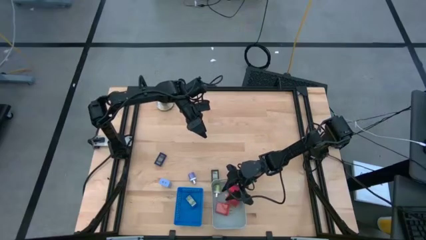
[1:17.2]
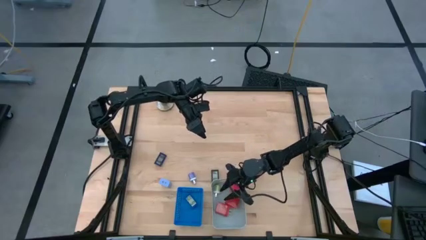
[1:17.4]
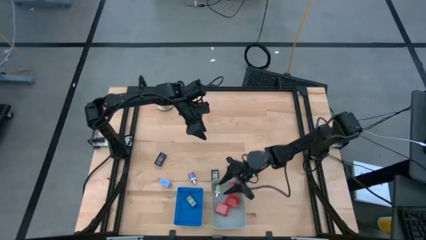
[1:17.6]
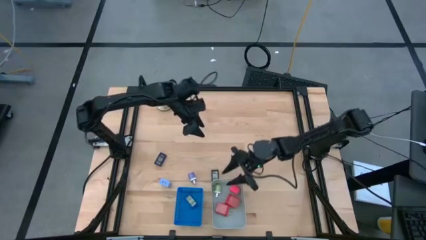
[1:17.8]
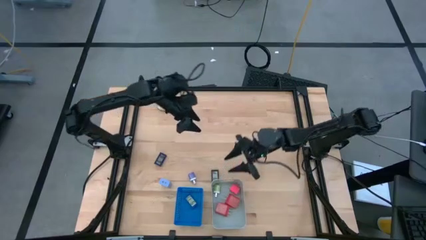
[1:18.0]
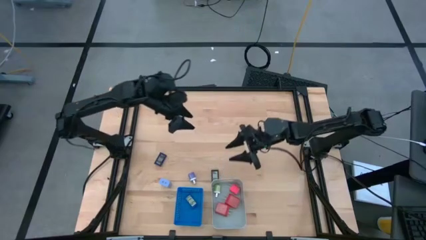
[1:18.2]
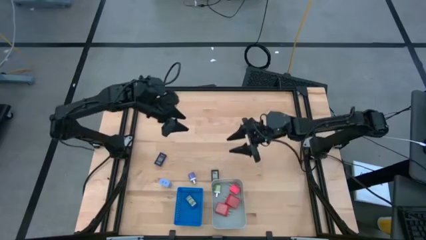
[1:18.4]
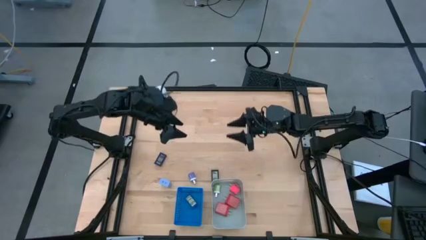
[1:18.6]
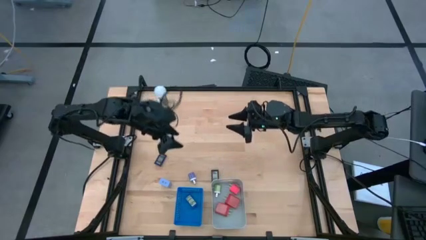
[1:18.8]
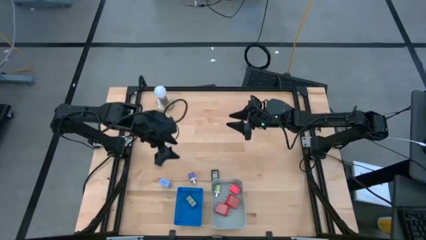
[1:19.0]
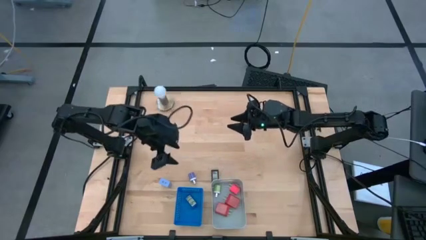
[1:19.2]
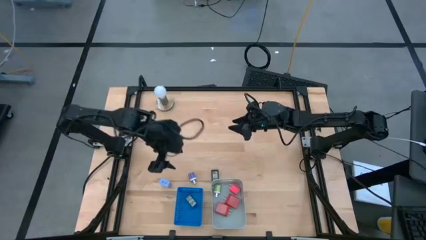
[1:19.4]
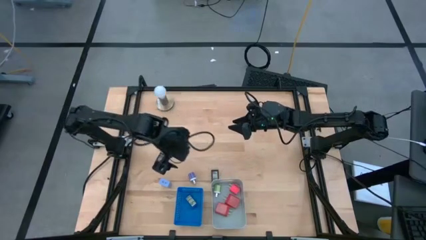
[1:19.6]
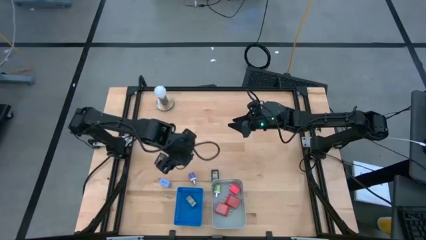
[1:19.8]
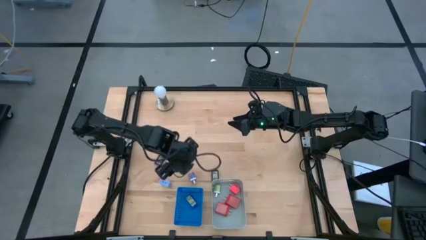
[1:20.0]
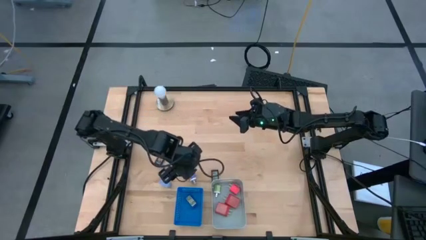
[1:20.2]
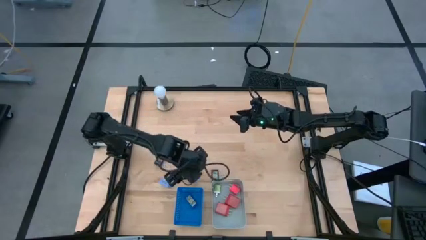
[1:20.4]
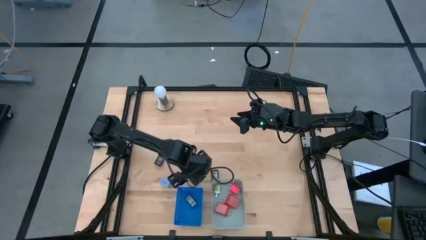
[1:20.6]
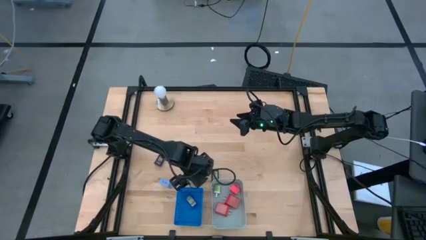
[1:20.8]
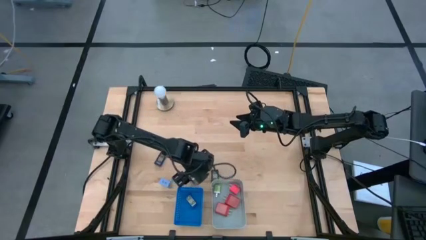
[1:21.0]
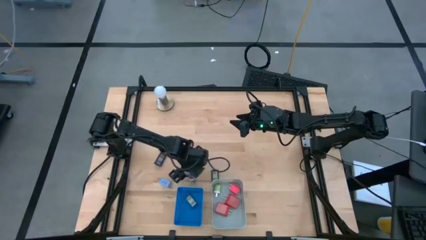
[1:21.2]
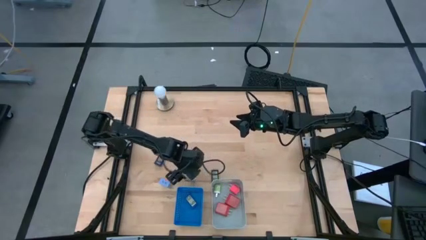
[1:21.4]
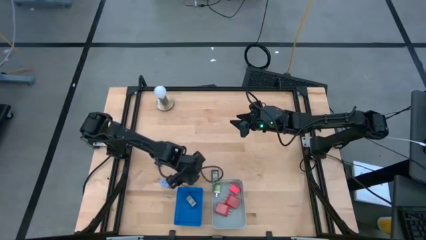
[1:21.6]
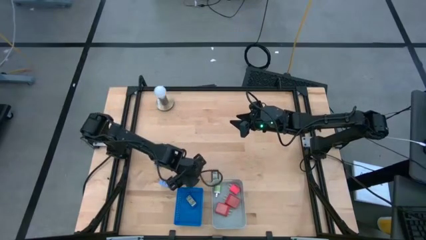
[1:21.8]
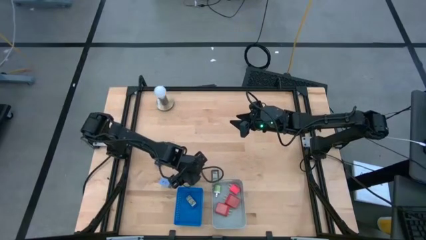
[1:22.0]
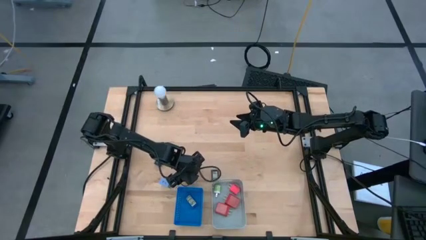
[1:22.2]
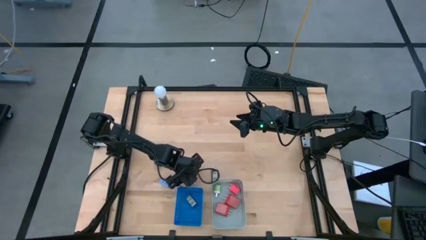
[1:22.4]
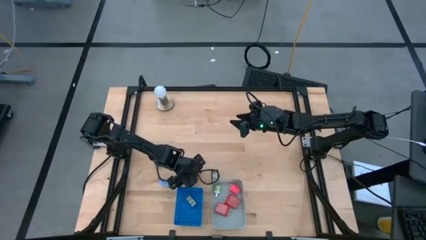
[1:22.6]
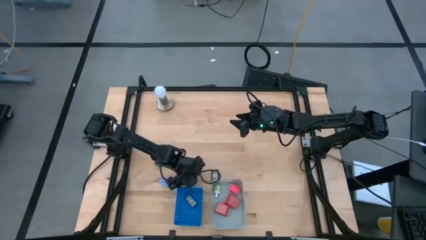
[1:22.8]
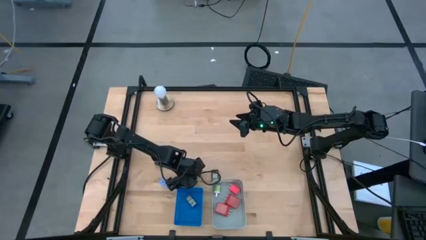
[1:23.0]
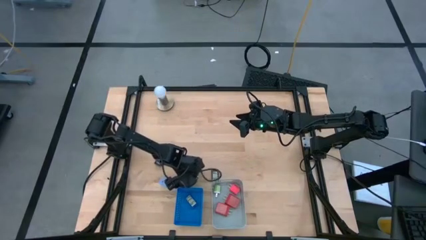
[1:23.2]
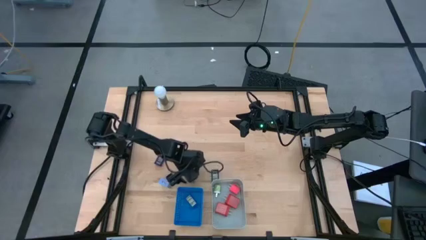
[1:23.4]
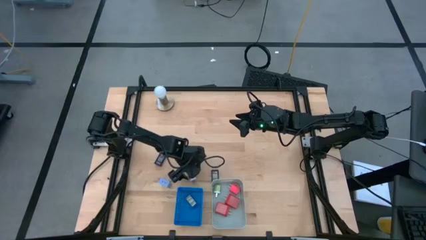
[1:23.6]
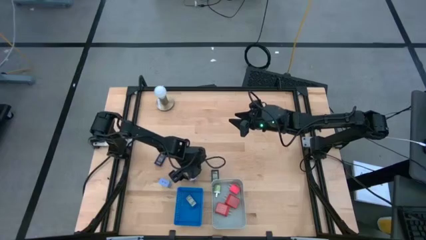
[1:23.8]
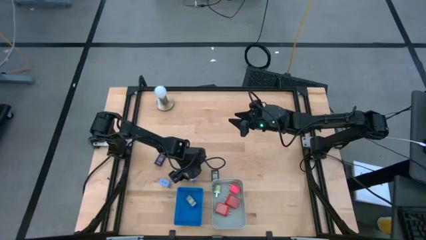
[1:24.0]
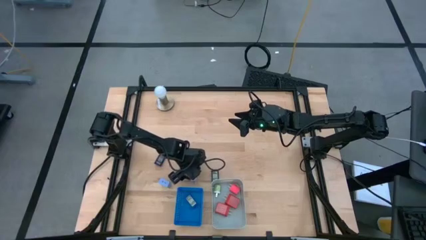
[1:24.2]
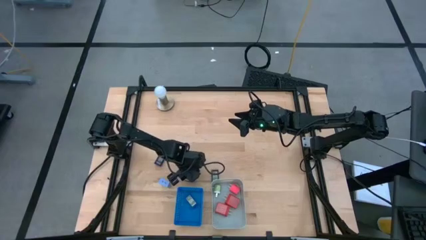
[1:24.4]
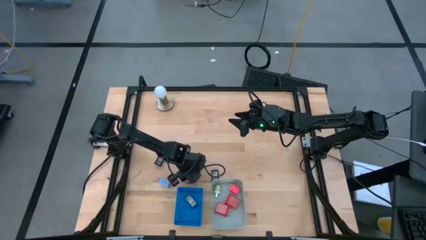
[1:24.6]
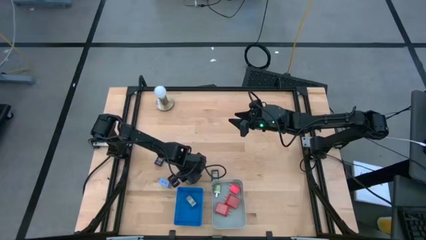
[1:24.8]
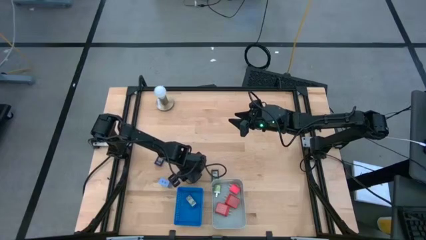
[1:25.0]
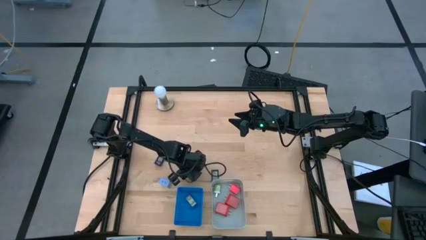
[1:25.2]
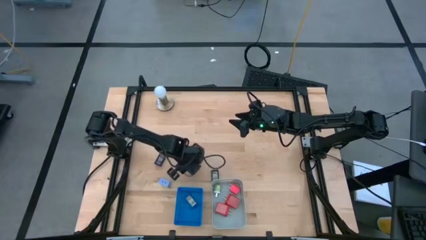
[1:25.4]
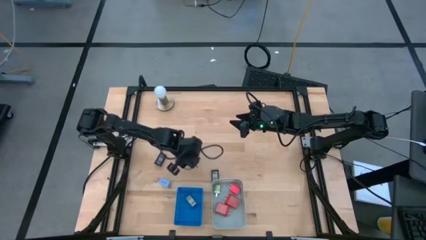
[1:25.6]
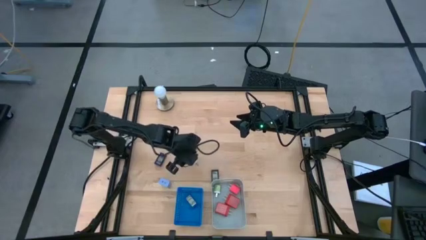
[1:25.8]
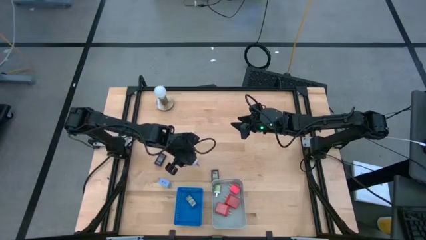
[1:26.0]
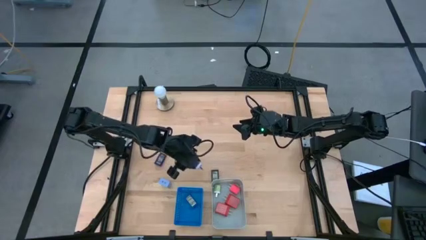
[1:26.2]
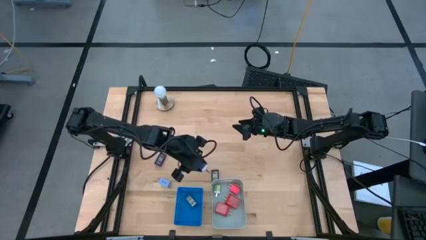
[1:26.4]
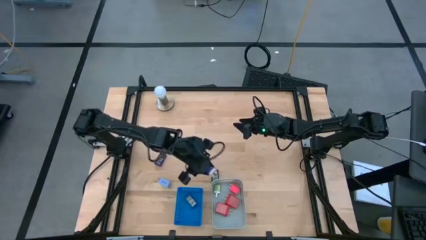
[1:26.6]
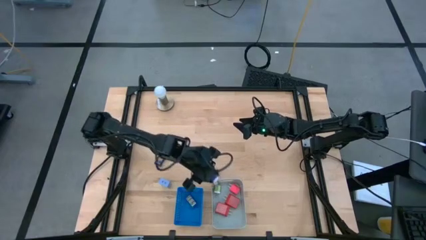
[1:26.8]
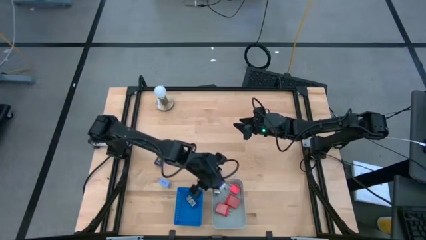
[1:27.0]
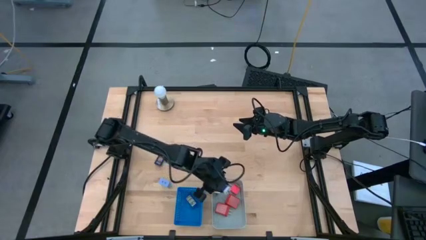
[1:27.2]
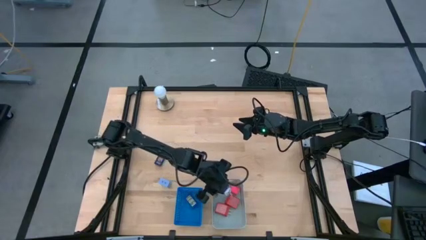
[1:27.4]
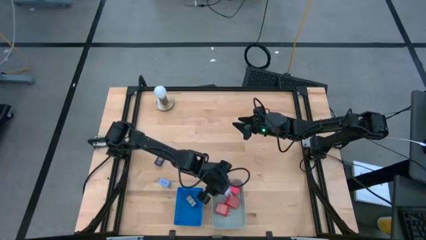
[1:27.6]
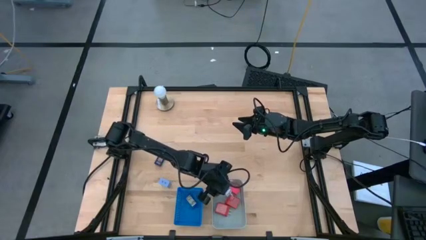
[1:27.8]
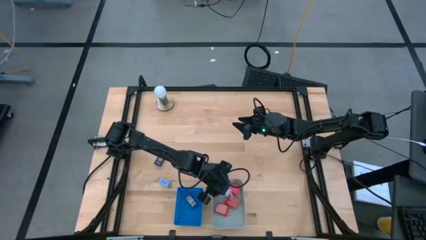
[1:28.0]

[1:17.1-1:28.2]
Task: Pick & Place Office items
Put the purple charger adapter into the gray bin

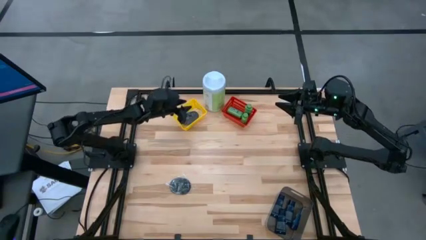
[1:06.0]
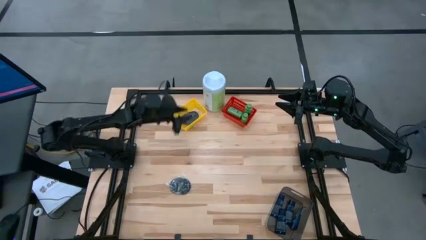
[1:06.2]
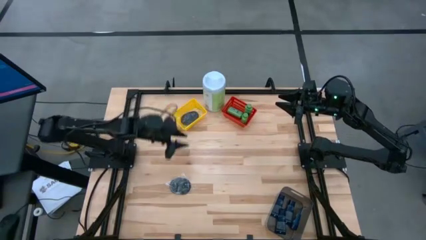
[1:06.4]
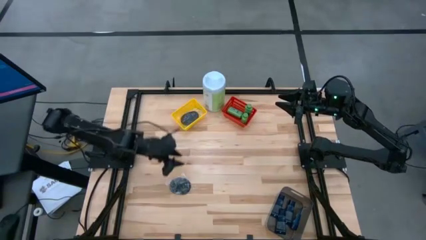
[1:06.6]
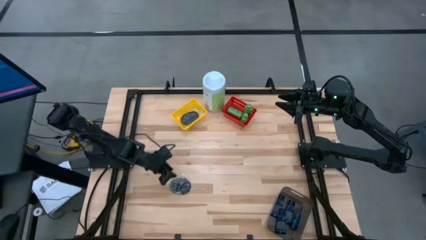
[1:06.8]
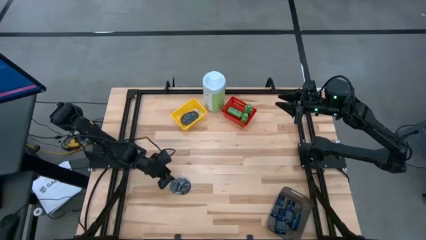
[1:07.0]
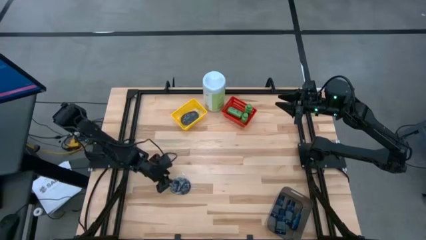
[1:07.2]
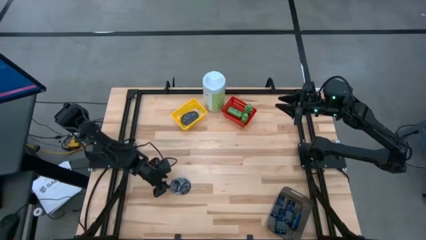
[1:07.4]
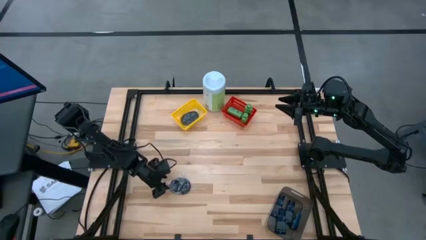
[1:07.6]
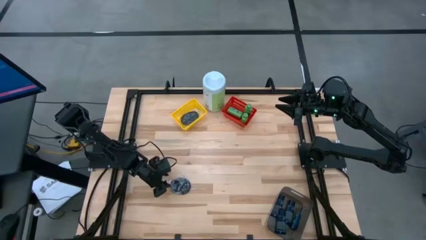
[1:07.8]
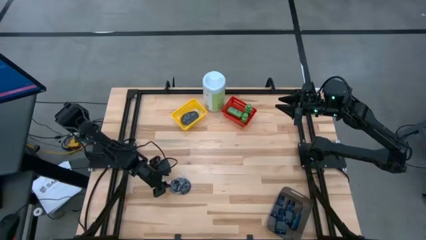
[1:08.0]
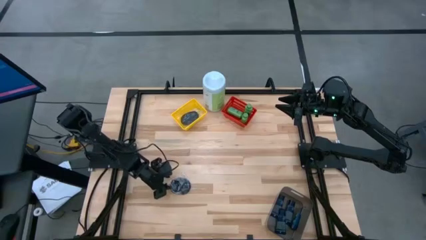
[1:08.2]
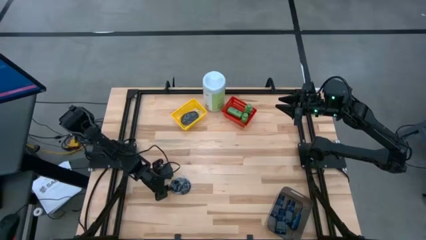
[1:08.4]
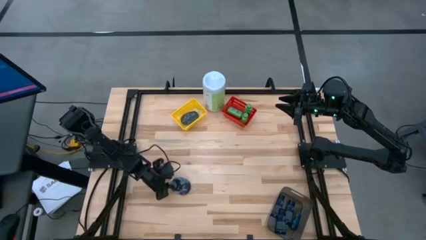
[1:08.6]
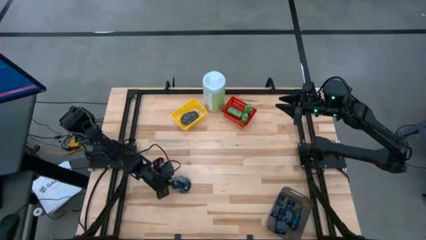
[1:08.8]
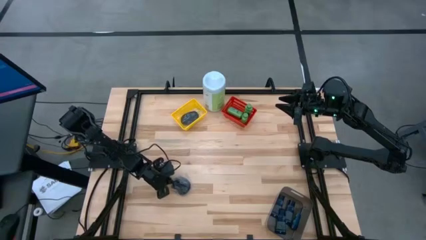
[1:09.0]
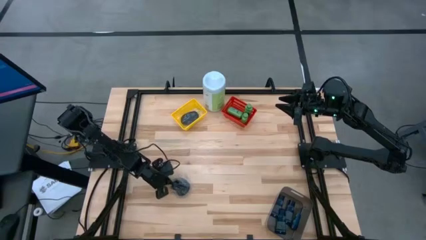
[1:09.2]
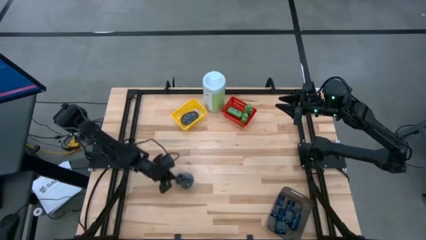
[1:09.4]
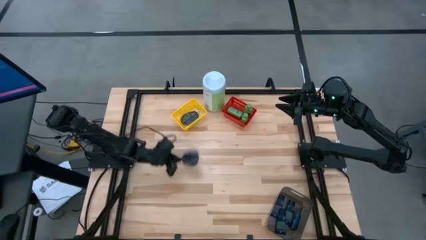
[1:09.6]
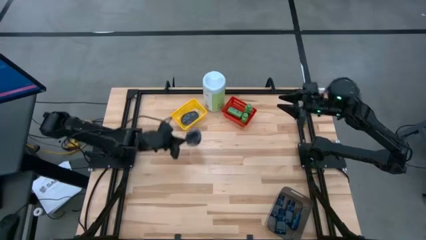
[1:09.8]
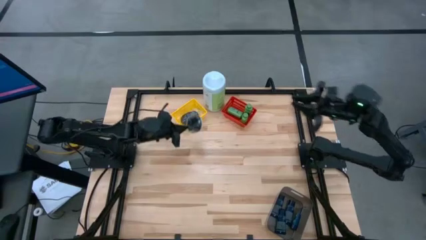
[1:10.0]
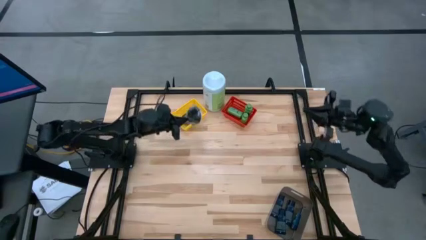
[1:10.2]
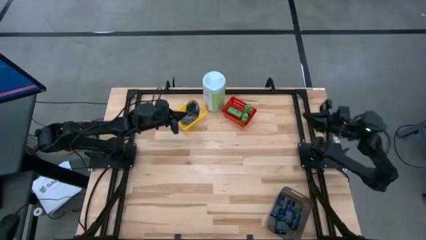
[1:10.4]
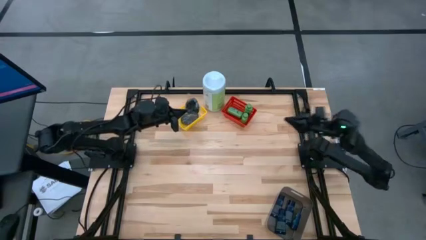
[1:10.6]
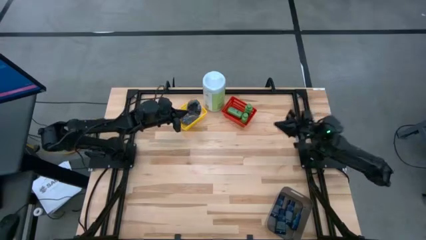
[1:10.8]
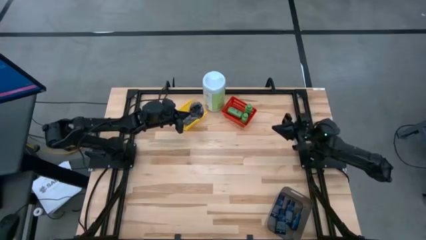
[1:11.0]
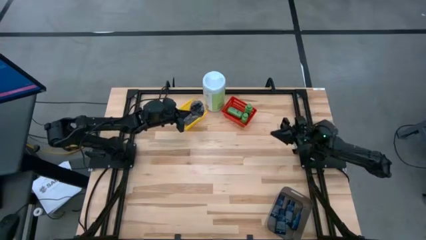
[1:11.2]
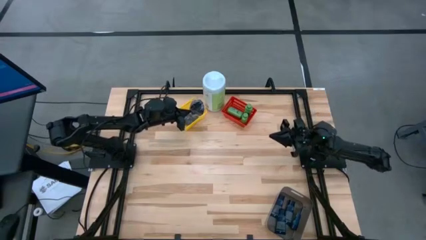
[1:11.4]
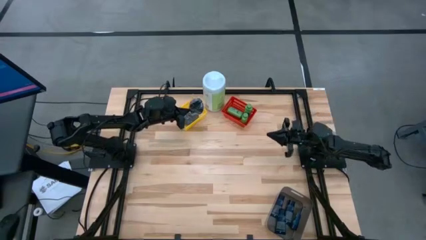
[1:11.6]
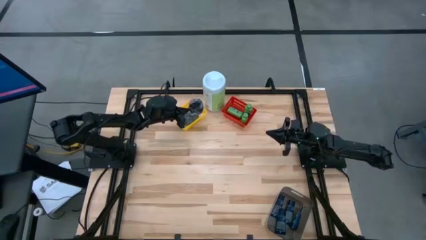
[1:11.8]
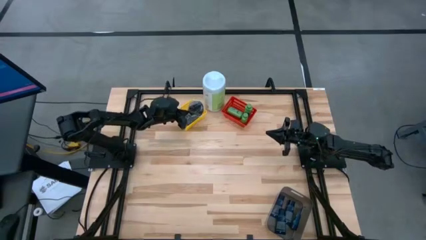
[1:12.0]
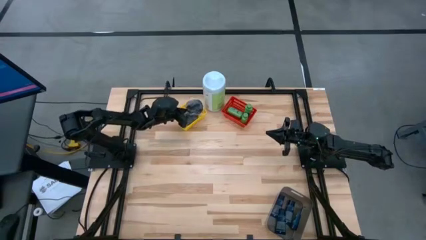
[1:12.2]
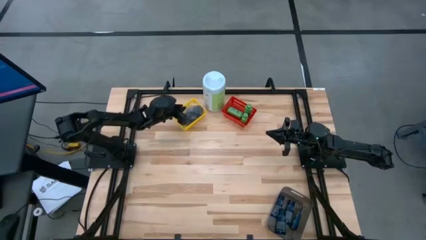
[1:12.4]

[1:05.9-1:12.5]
Task: Pick & Place Travel size toiletries
Put the black hairbrush in the yellow bin
